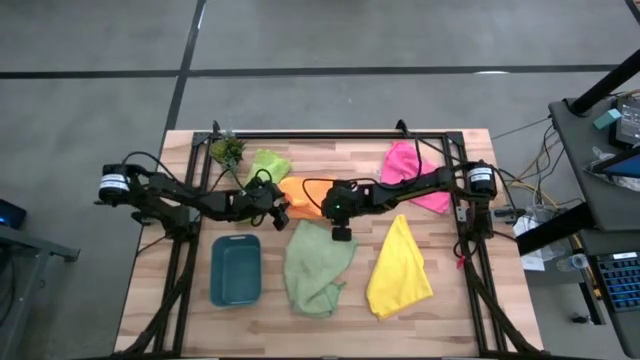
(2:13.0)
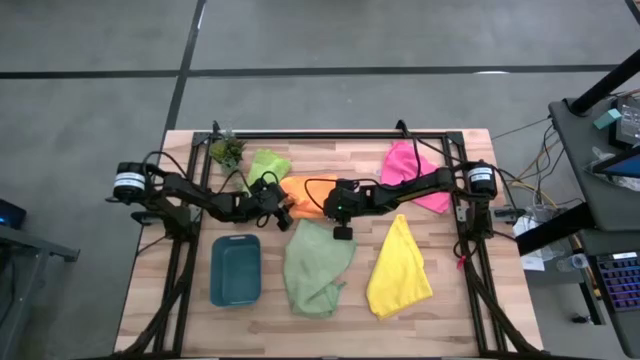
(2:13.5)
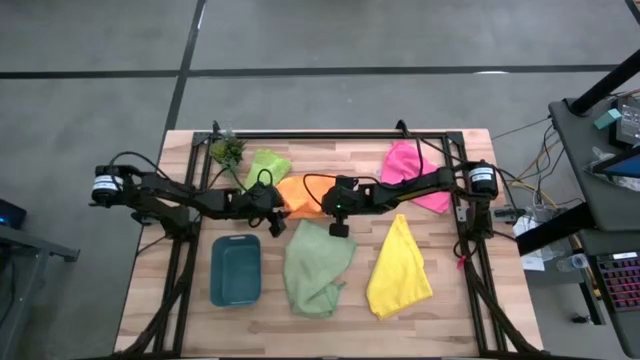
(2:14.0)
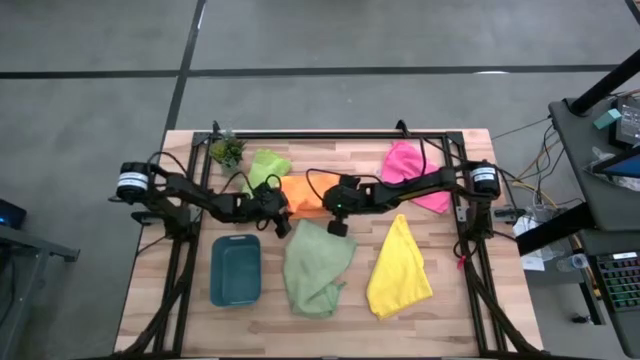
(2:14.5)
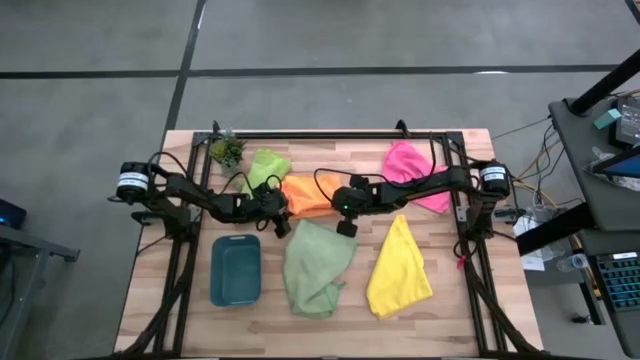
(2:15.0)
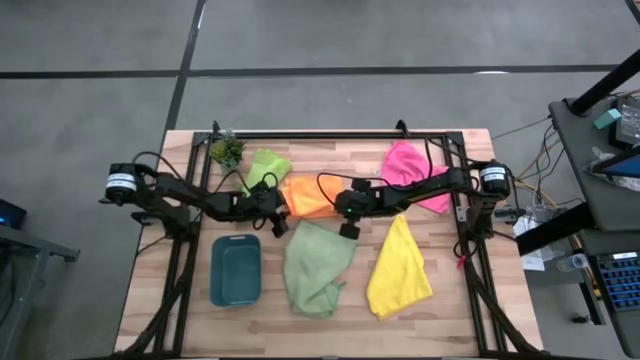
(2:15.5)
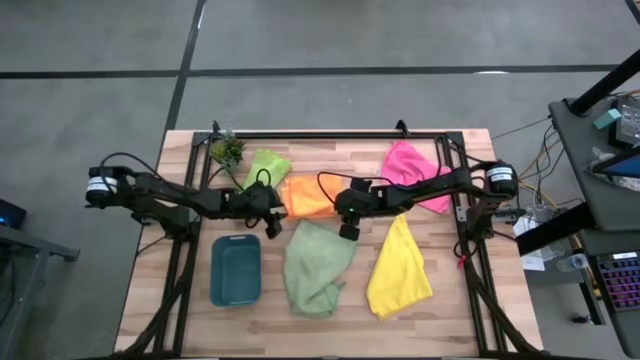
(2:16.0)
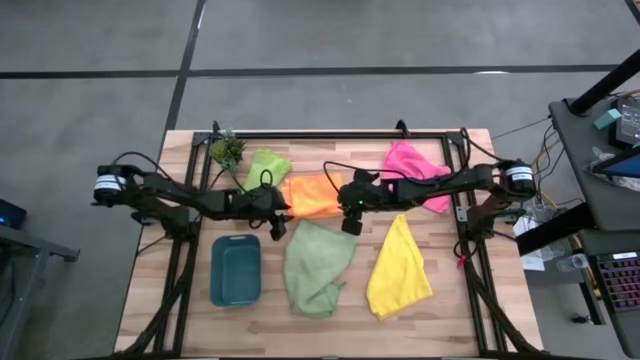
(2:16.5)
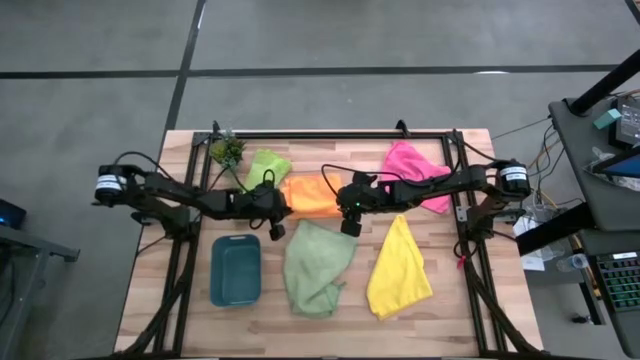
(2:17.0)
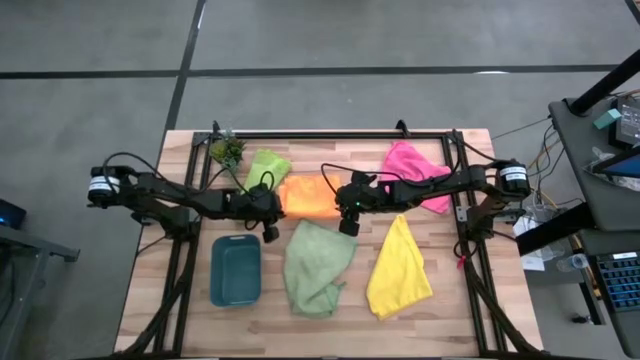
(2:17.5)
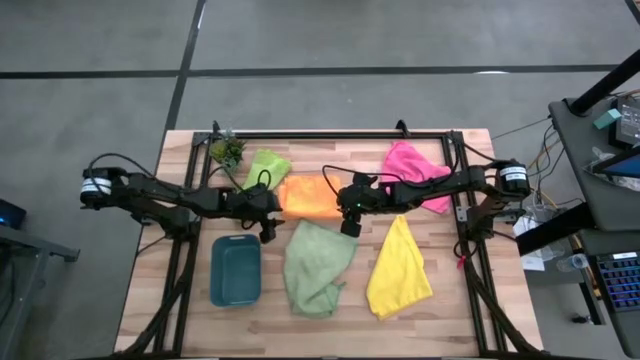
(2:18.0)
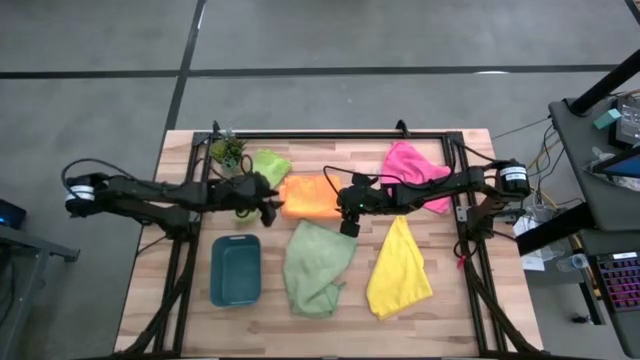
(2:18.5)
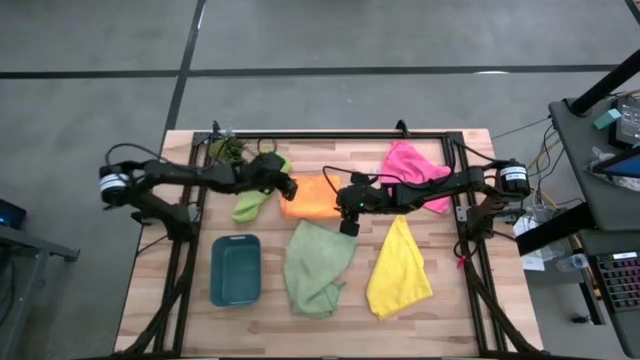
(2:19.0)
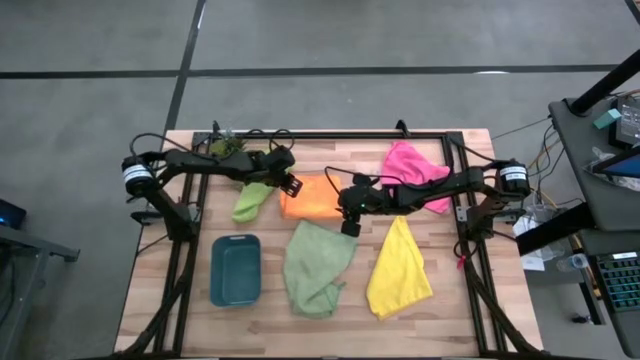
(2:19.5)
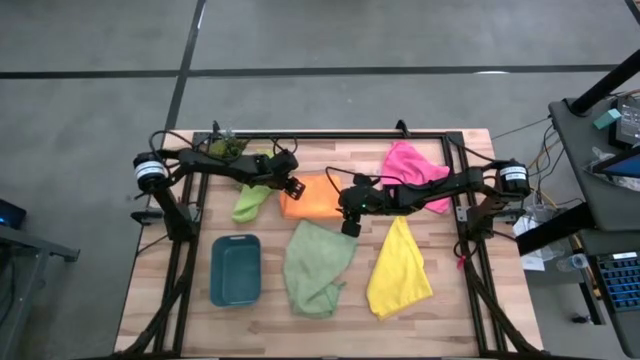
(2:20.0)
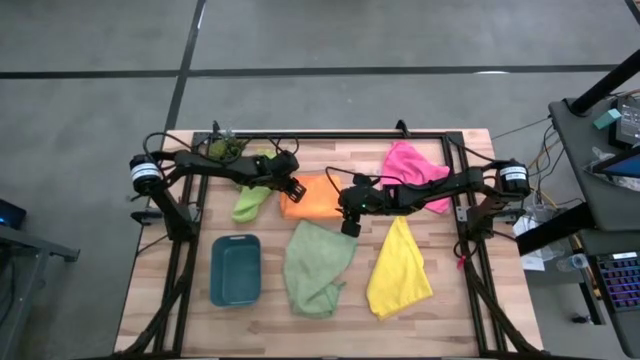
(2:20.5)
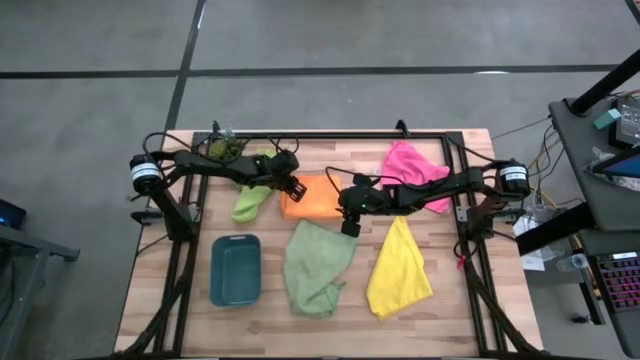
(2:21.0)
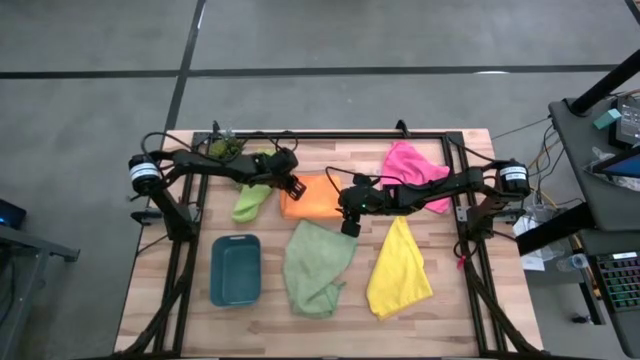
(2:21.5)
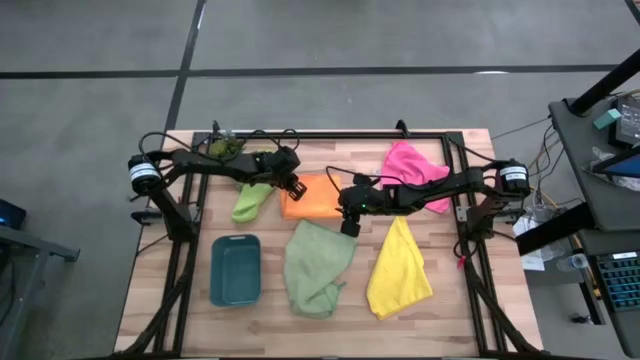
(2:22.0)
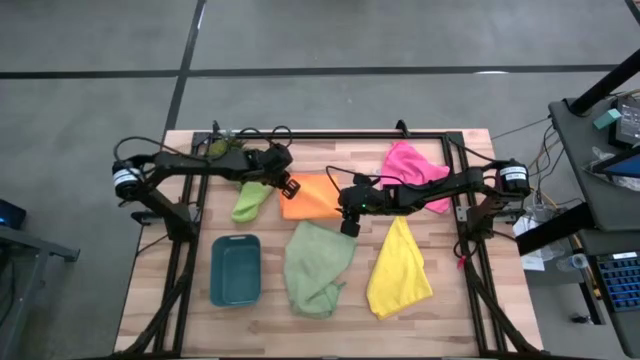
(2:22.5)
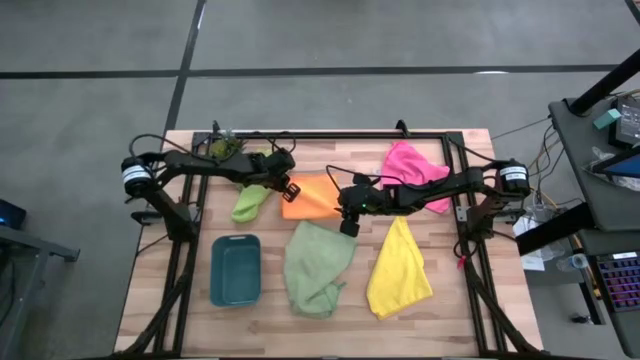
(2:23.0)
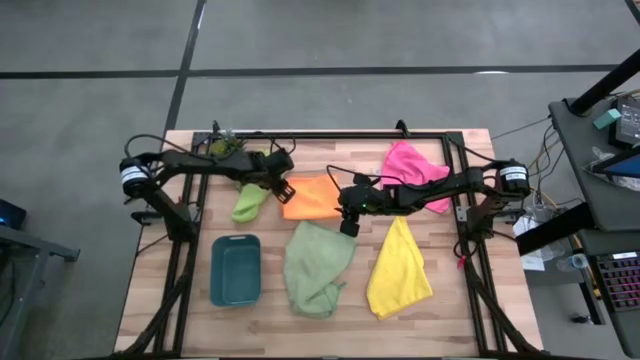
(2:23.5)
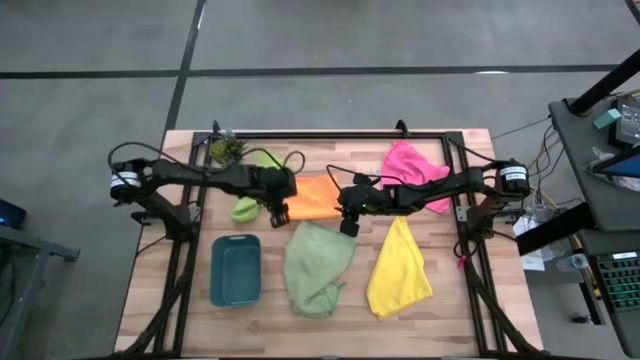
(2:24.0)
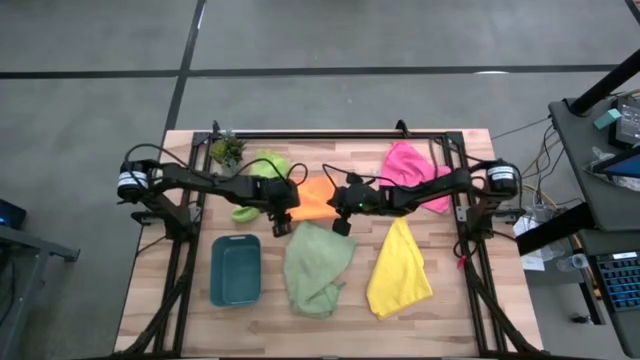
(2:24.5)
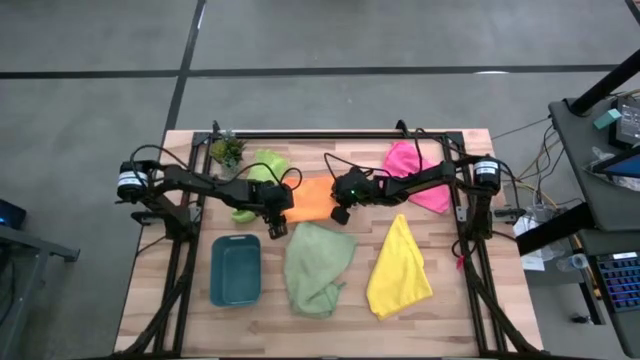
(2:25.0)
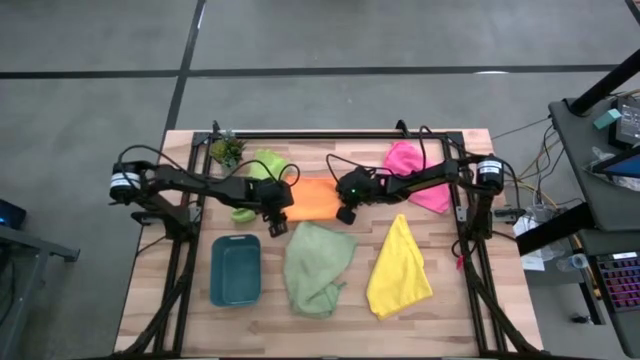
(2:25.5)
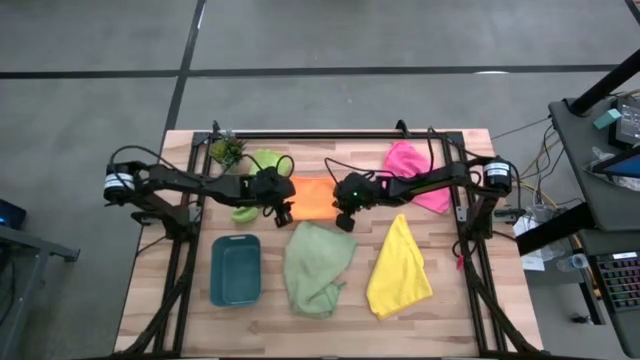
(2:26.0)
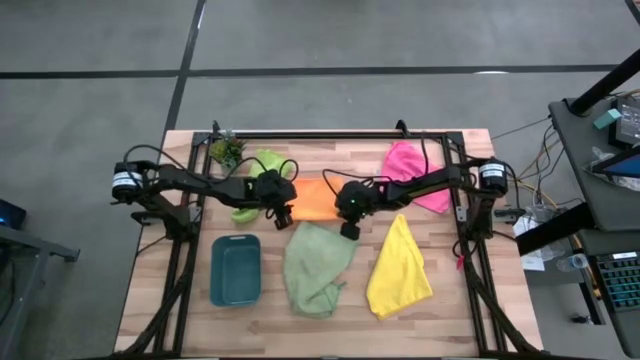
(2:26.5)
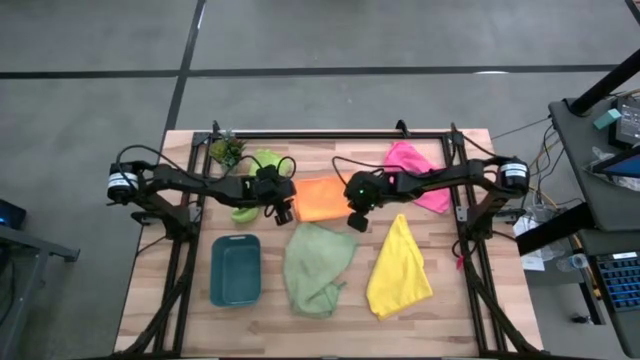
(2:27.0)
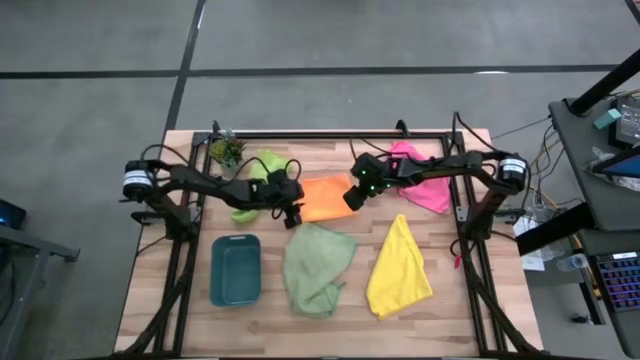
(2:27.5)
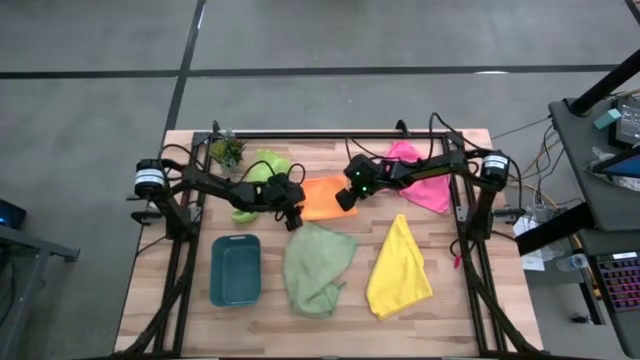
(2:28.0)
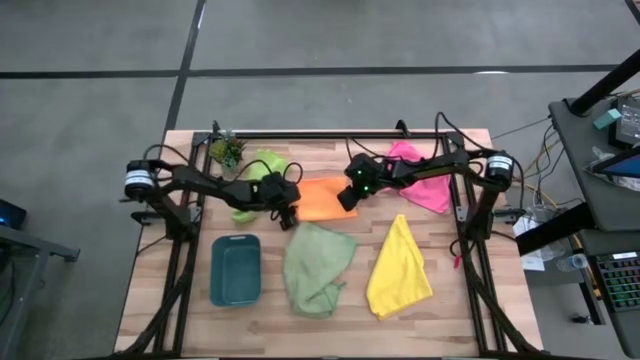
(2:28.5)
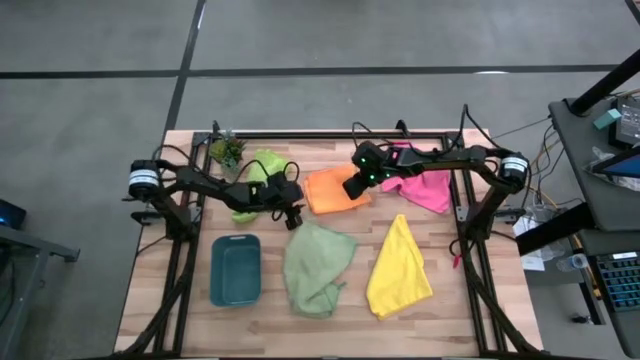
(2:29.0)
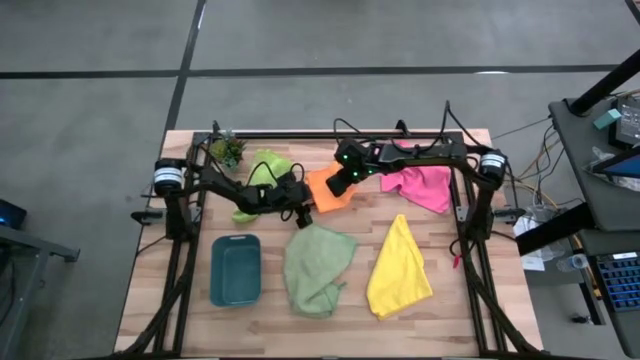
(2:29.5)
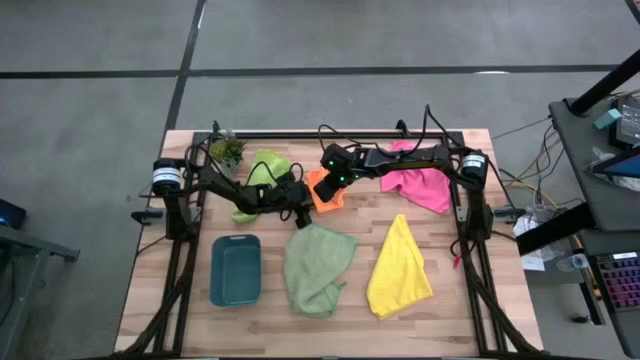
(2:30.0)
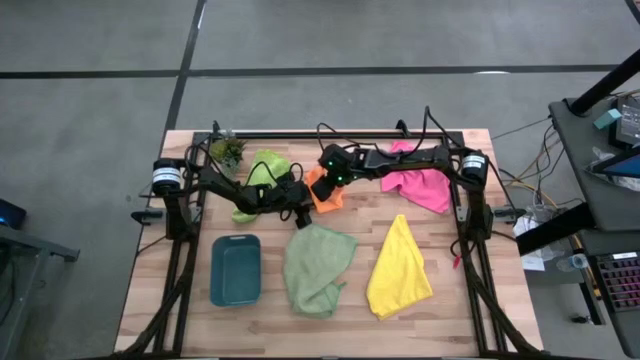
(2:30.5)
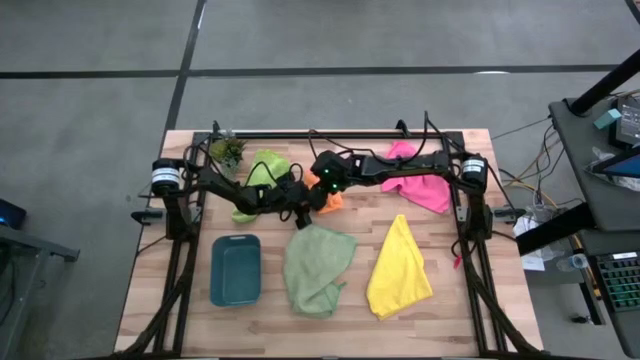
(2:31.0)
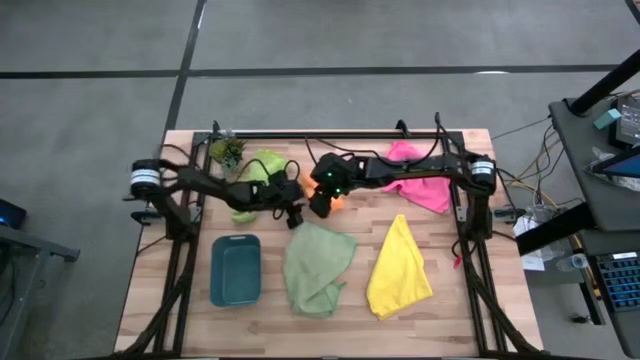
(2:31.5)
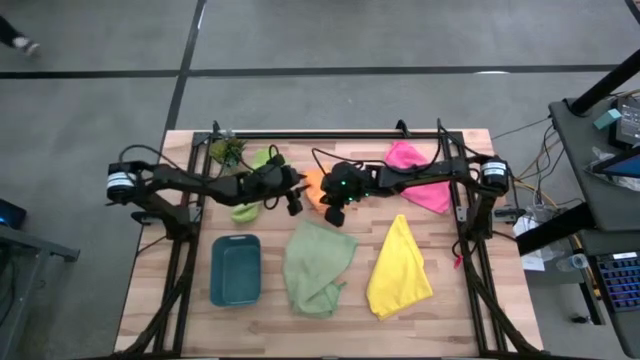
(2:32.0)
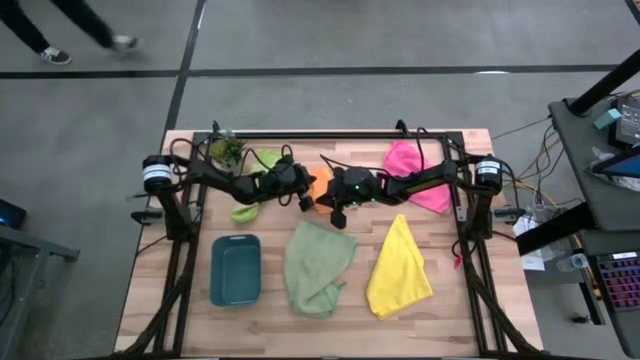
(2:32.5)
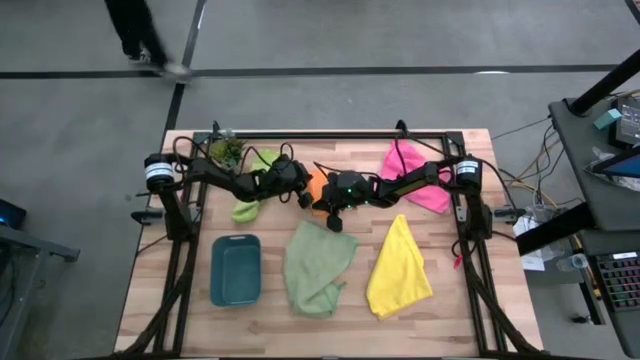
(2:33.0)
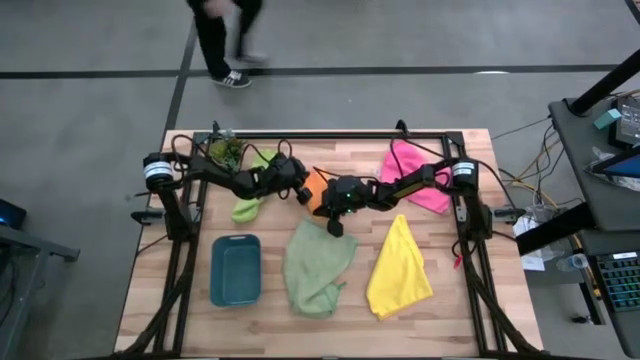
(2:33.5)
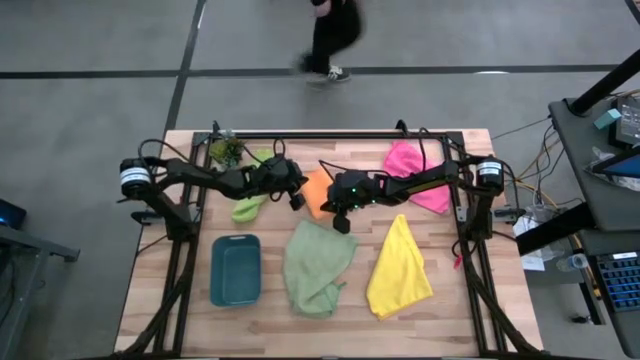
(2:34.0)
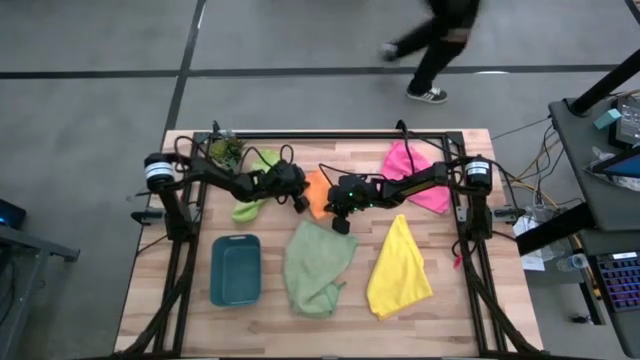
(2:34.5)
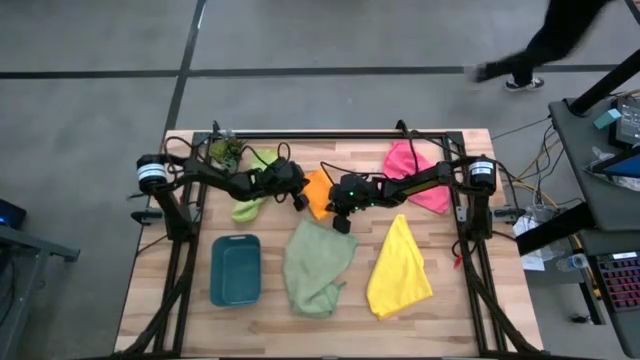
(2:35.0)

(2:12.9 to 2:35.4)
Task: Fold microfiber towels
Fold the orange microfiber cloth
